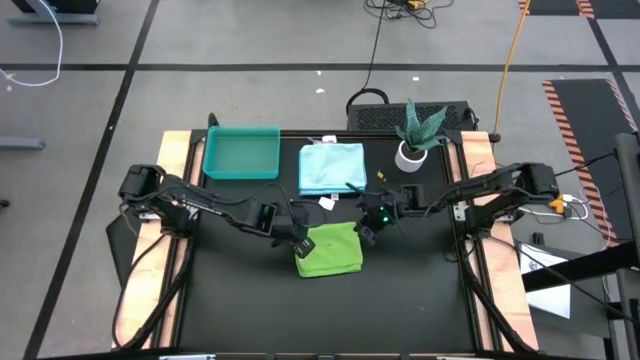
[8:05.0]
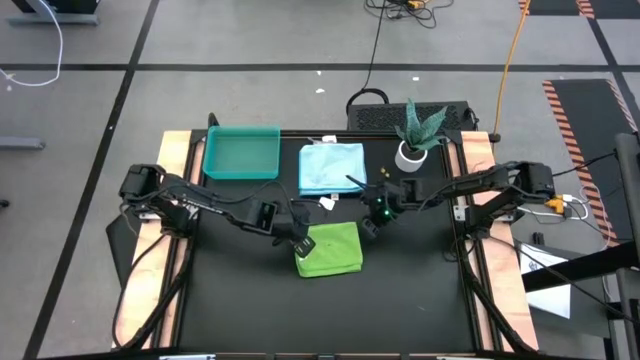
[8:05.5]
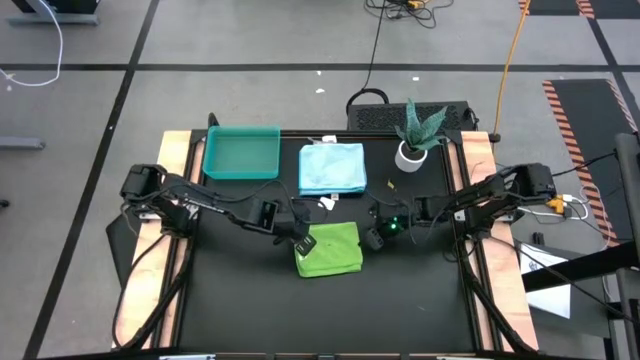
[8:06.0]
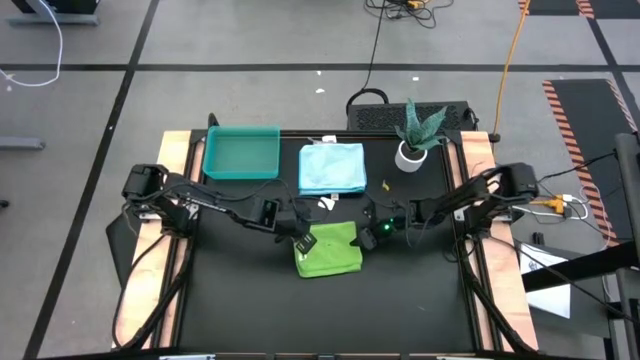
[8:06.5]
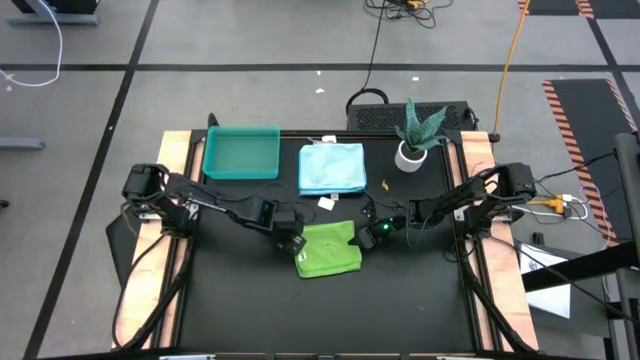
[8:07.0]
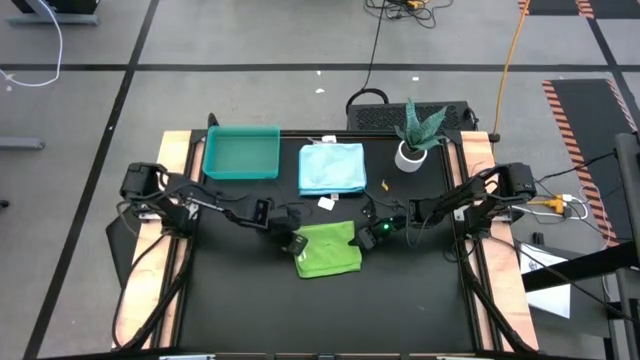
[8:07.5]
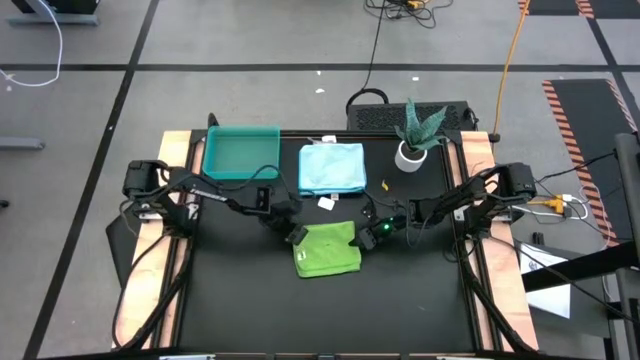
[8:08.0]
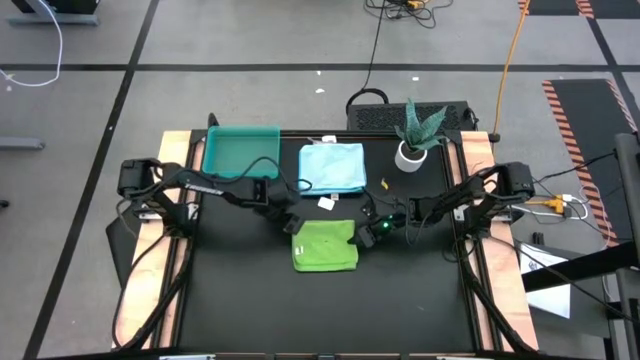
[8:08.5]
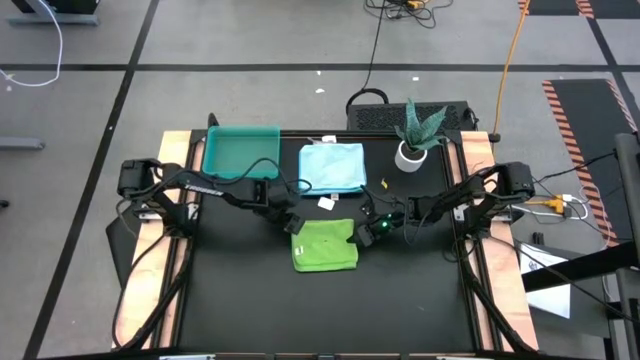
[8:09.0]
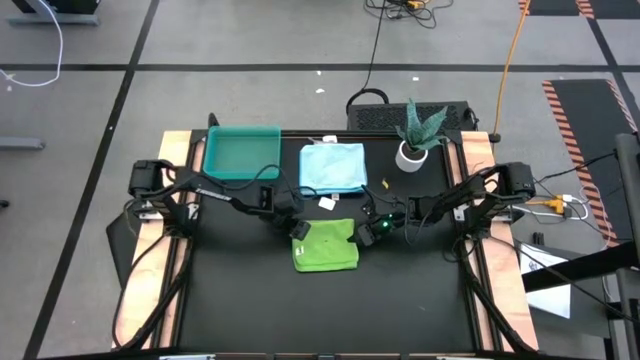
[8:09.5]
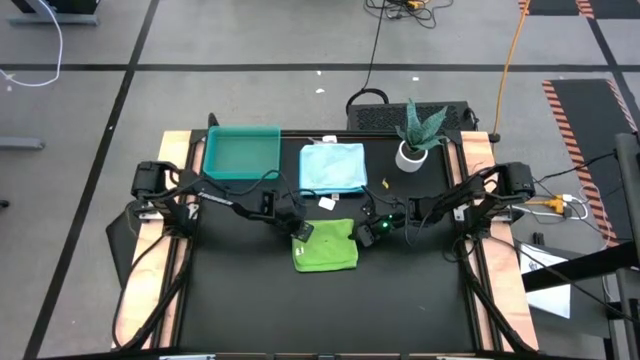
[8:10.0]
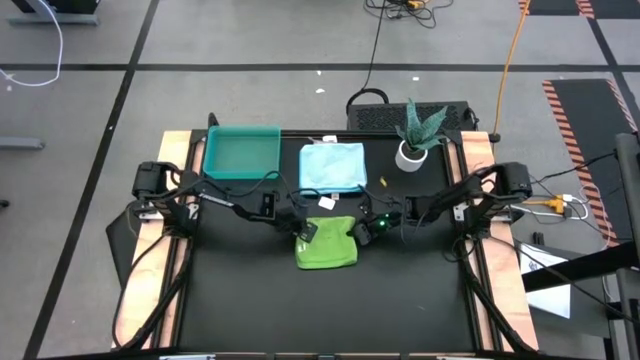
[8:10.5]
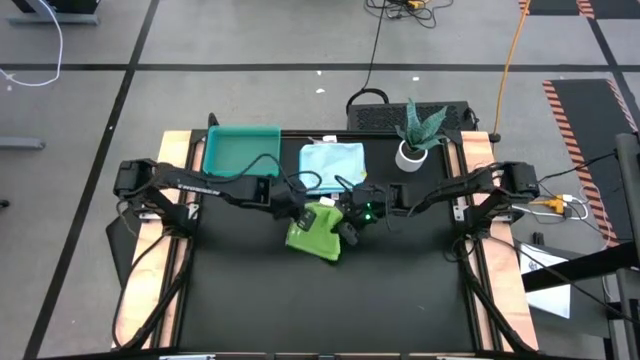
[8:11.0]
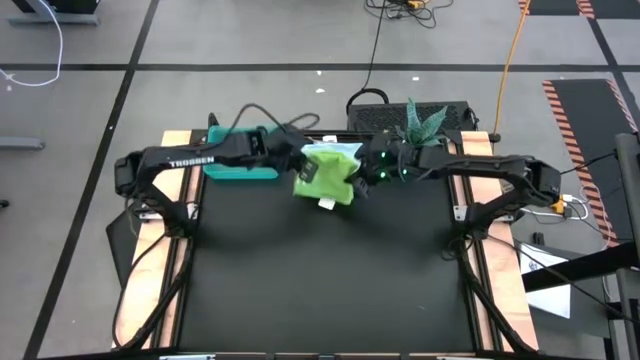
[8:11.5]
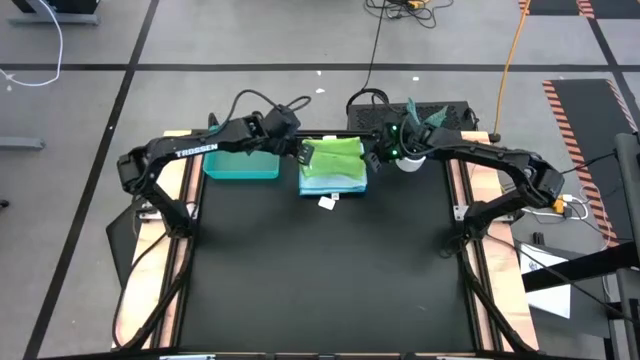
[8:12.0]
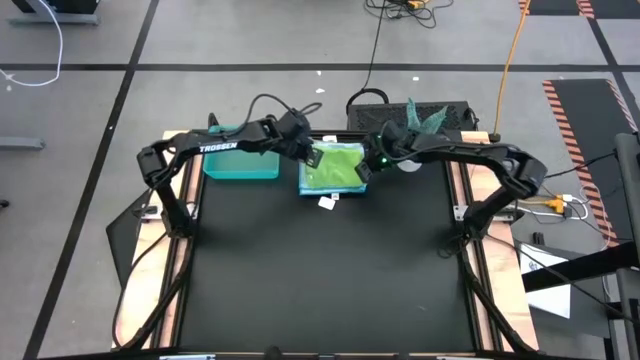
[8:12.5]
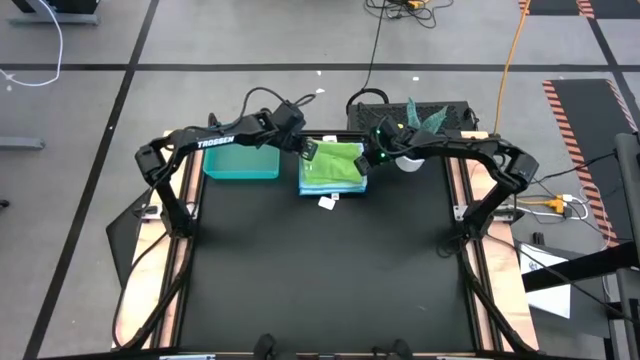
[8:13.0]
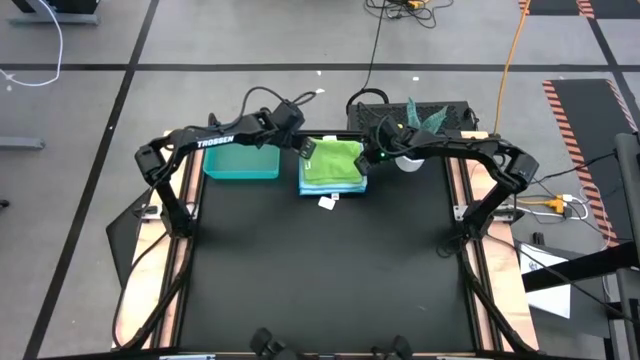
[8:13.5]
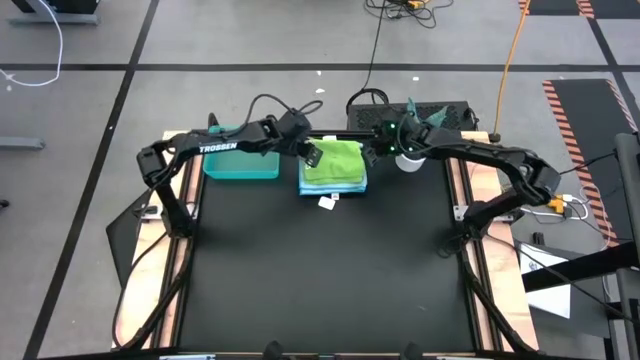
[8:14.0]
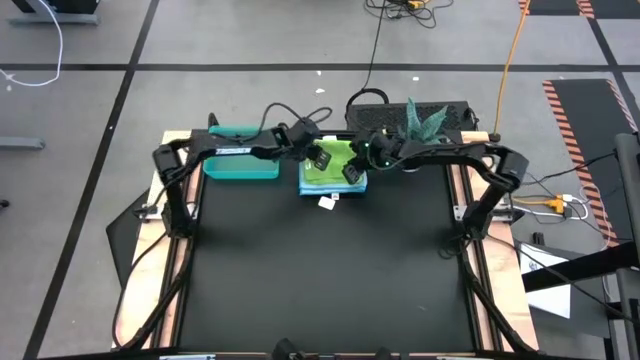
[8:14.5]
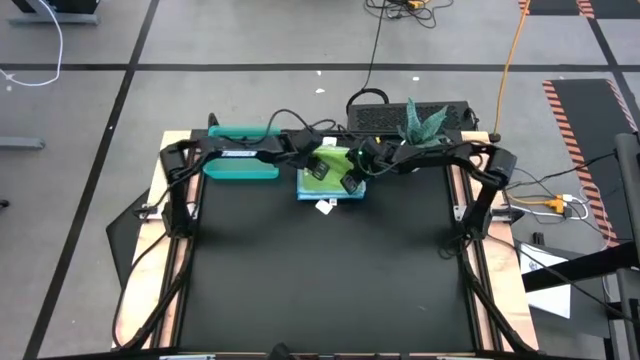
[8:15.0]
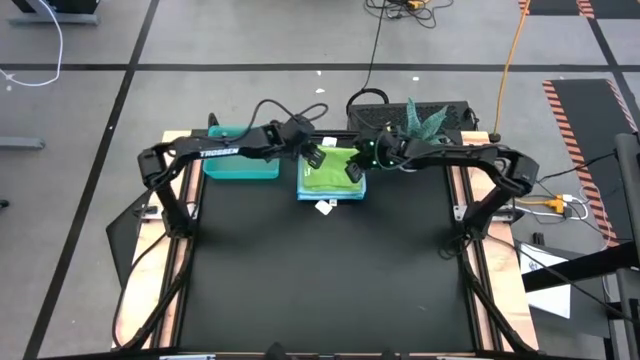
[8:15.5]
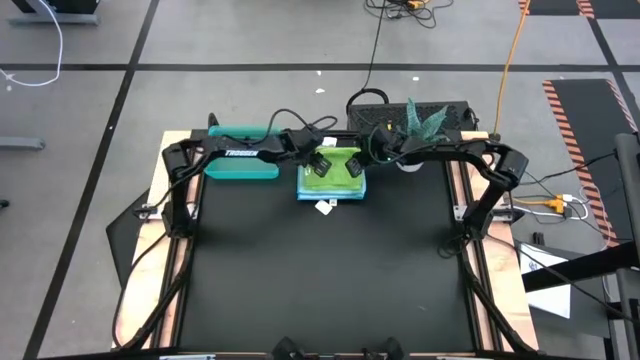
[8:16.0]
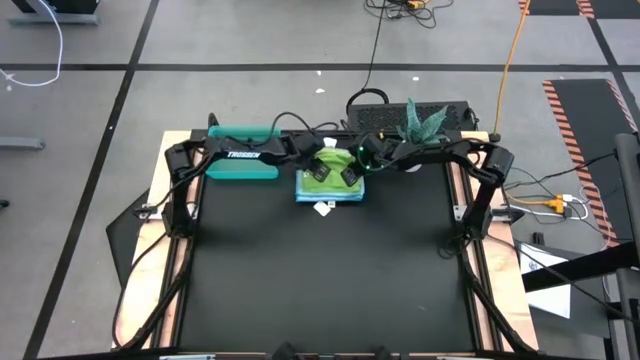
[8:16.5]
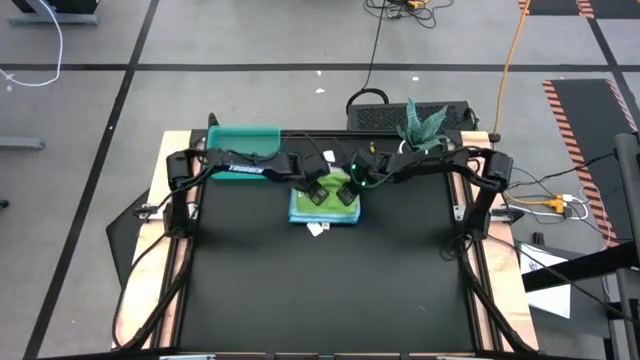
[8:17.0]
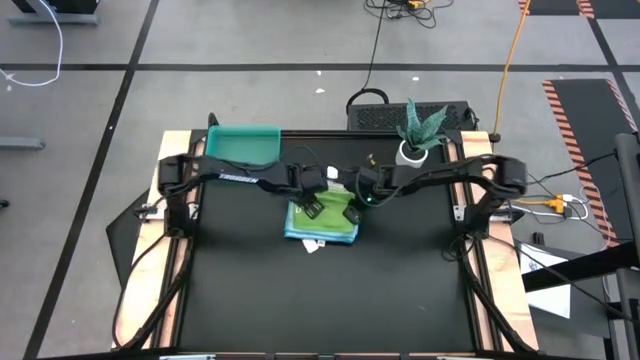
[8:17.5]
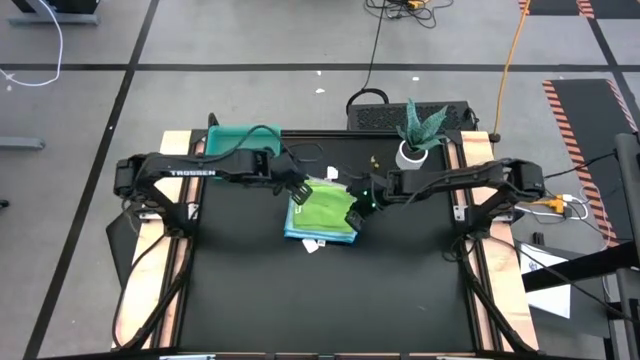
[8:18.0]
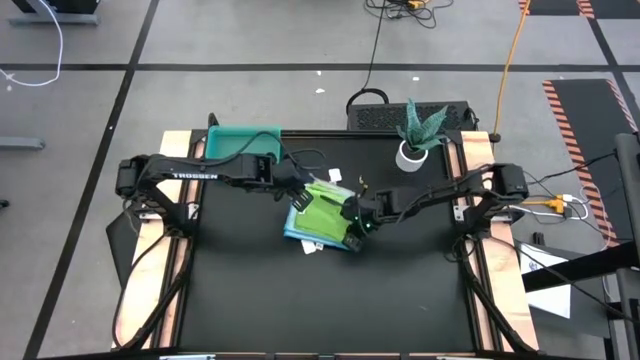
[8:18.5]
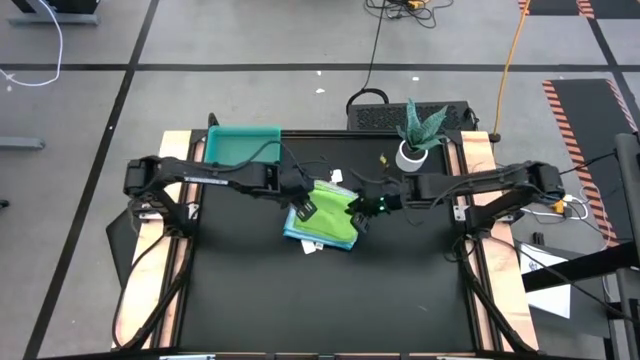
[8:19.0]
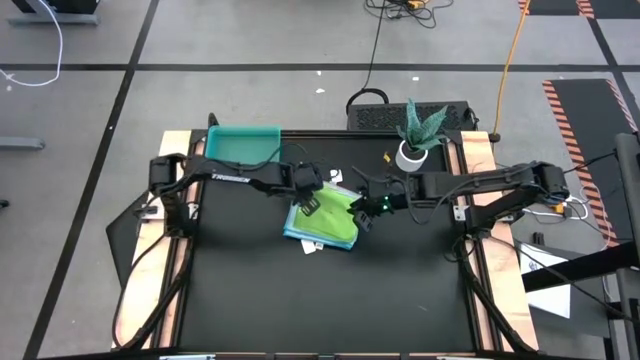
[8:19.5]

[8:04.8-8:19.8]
Task: Fold microfiber towels
Stack the folded green microfiber towel on top of the folded light blue microfiber towel

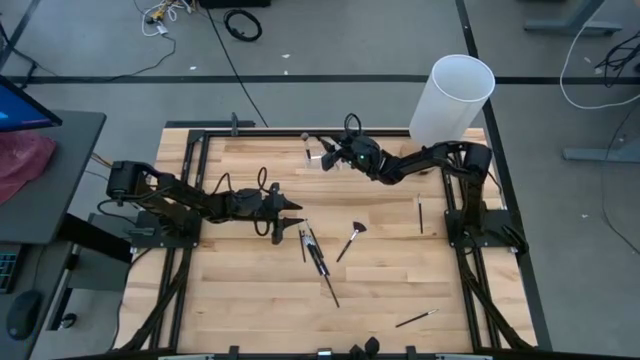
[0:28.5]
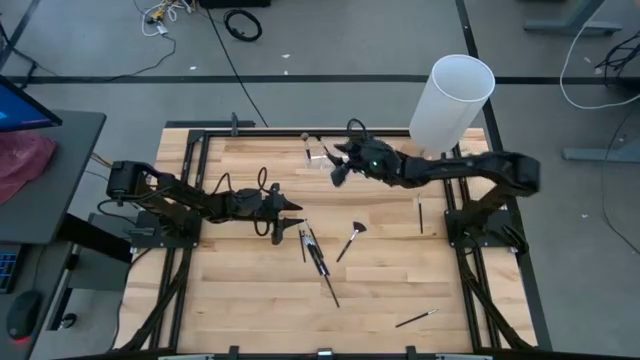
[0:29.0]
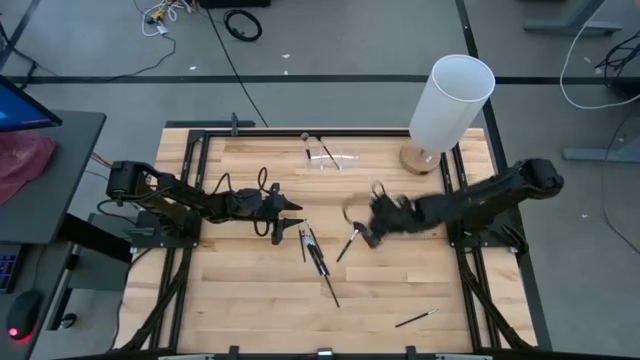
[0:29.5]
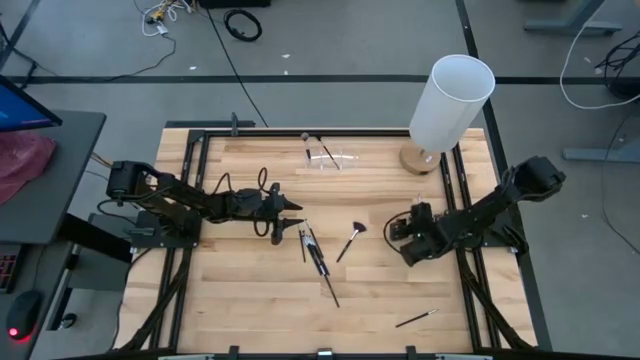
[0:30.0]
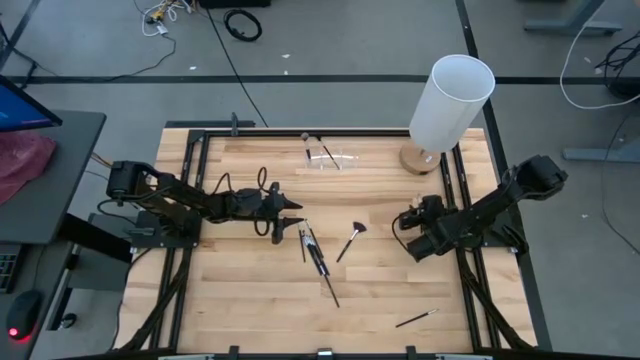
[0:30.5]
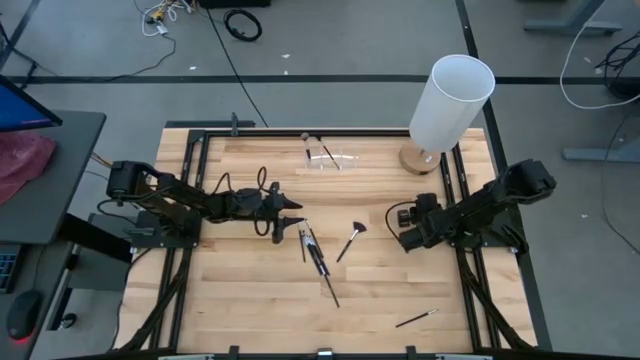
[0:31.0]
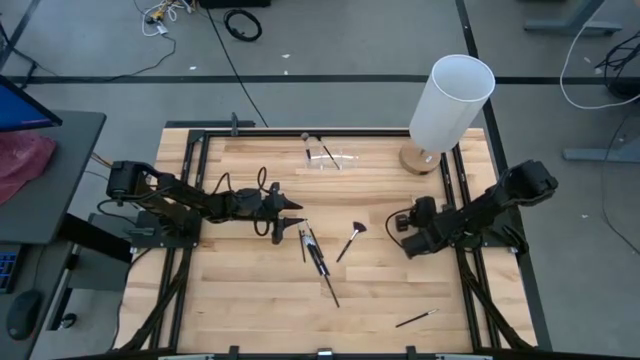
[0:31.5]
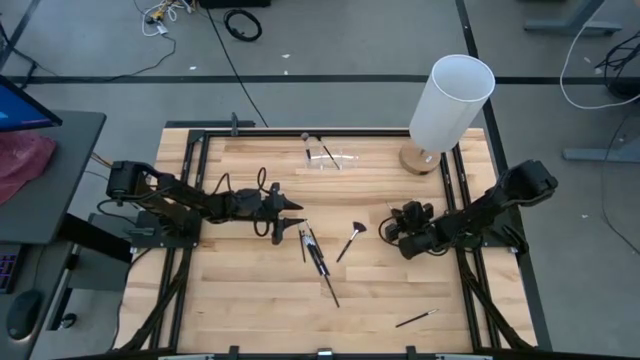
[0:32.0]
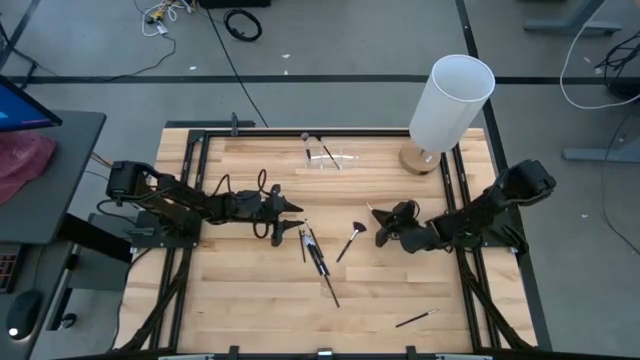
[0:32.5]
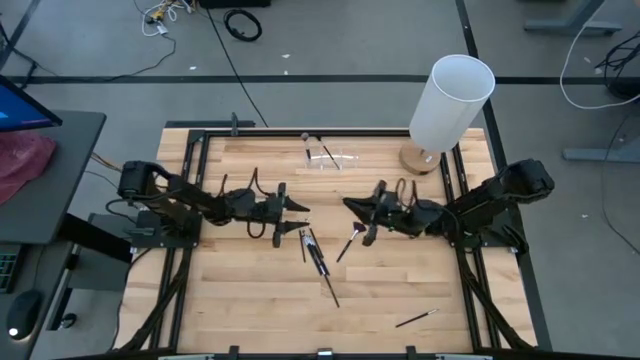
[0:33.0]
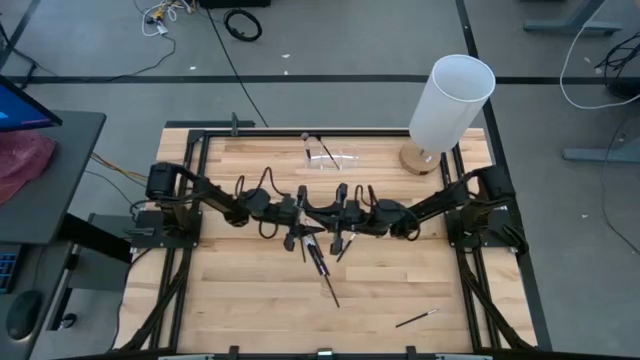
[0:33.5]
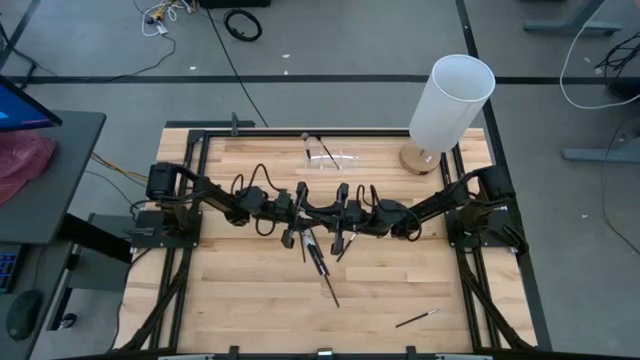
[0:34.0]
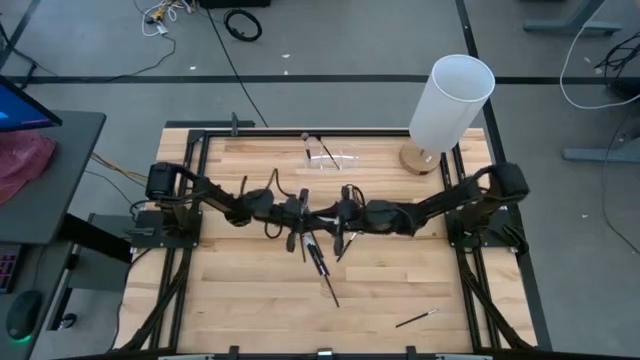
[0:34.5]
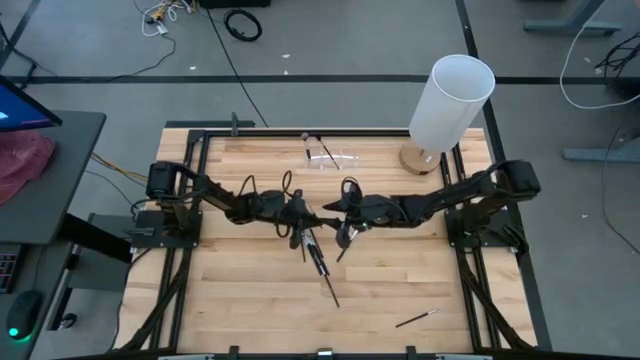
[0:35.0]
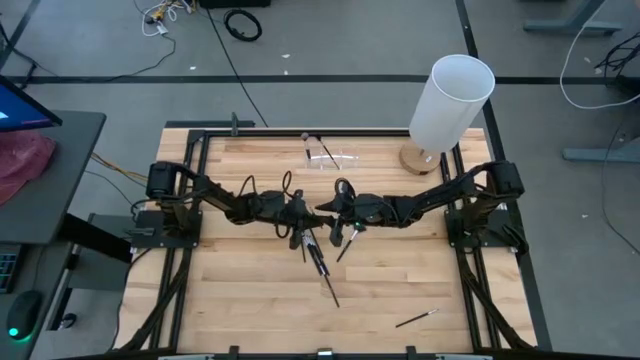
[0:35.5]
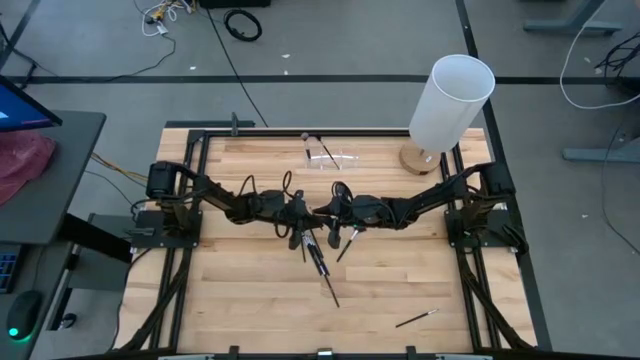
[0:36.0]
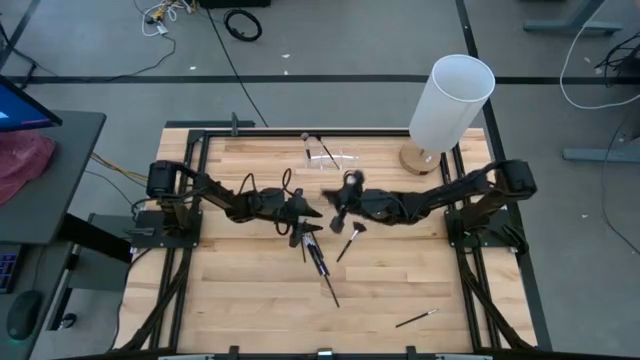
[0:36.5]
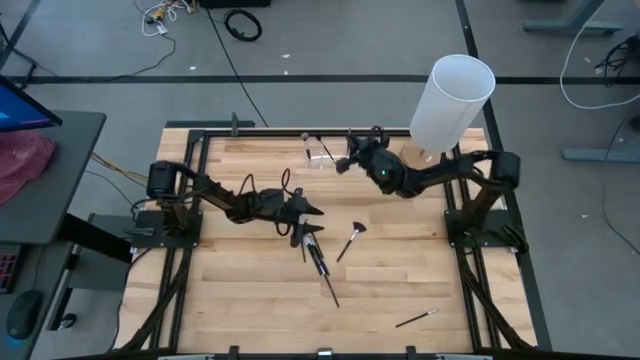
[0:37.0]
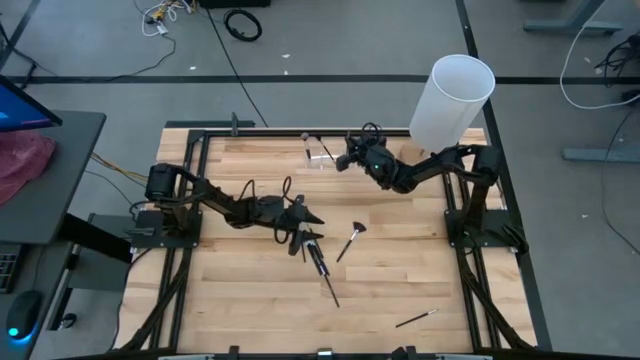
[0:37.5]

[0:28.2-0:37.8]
Task: Pick & Place Makeup Supplies
Put the black makeup brush into the transparent organizer
